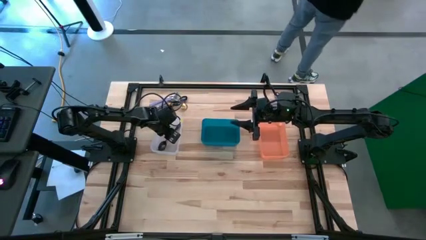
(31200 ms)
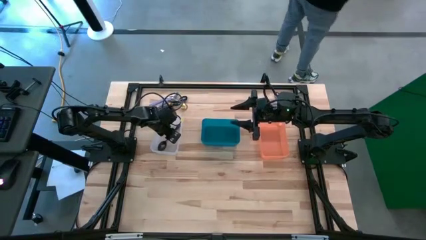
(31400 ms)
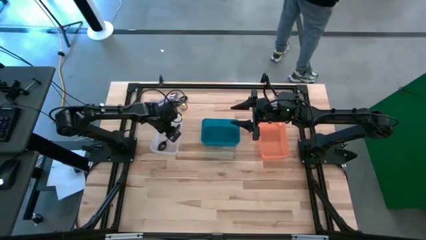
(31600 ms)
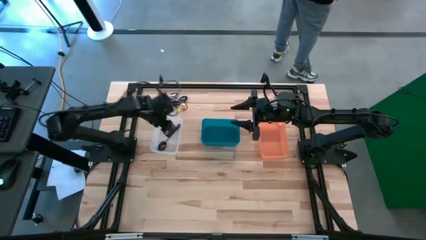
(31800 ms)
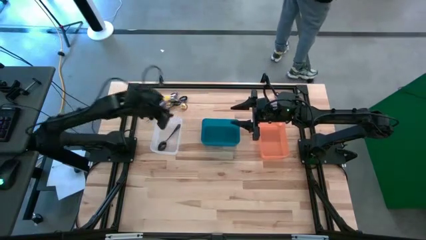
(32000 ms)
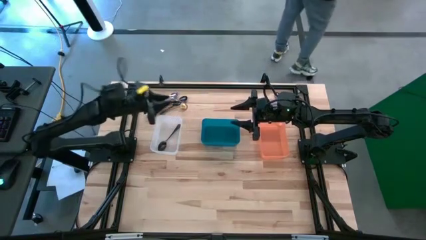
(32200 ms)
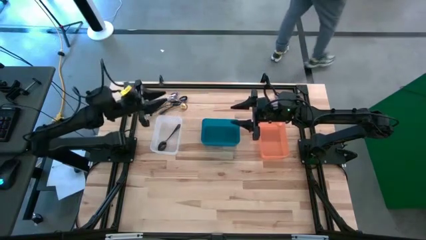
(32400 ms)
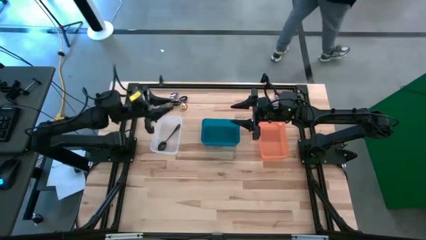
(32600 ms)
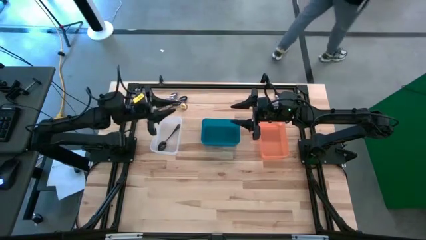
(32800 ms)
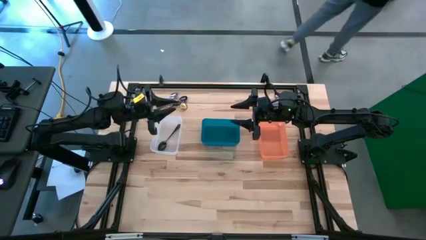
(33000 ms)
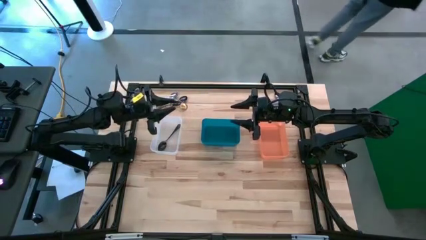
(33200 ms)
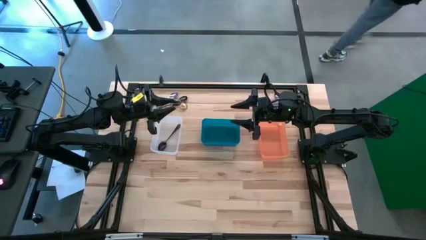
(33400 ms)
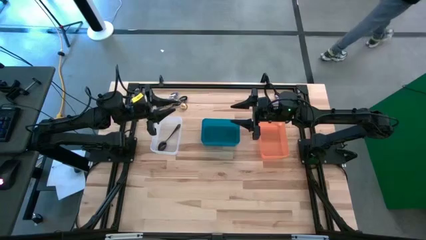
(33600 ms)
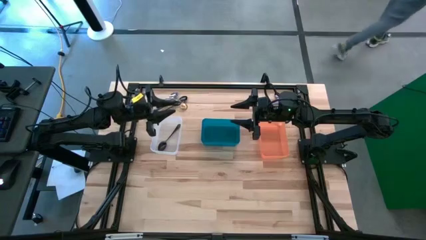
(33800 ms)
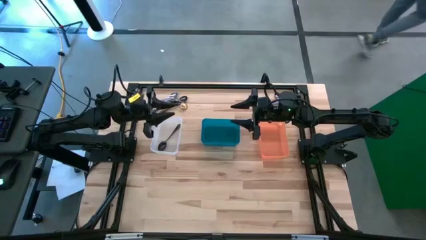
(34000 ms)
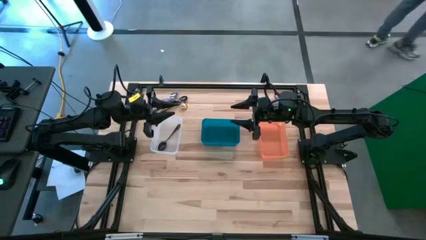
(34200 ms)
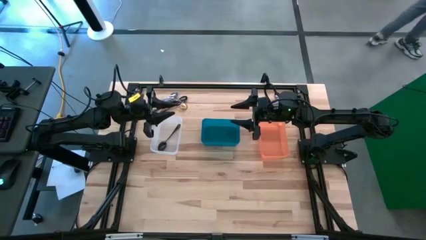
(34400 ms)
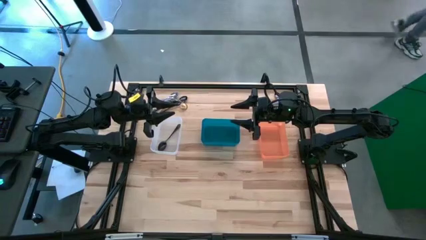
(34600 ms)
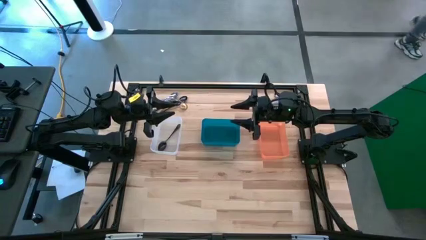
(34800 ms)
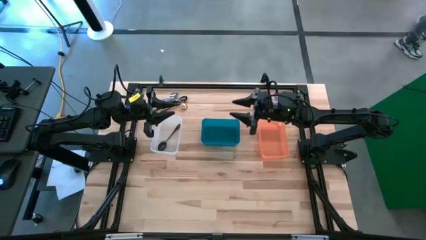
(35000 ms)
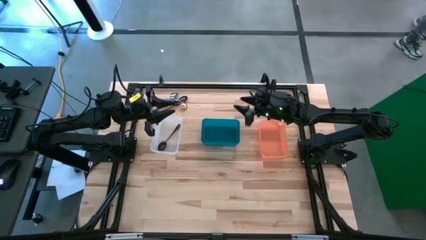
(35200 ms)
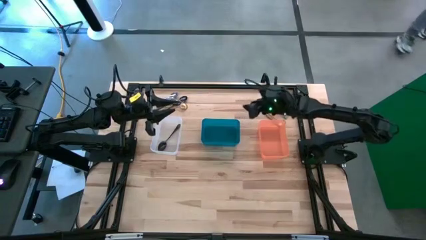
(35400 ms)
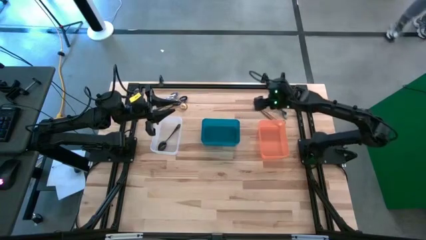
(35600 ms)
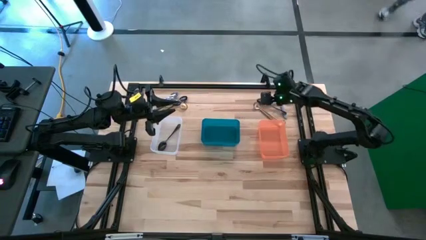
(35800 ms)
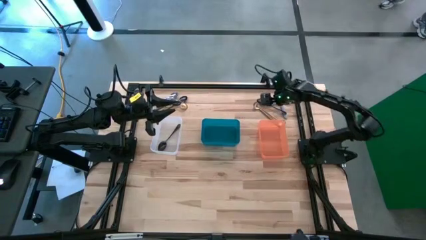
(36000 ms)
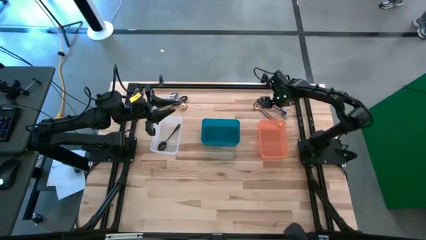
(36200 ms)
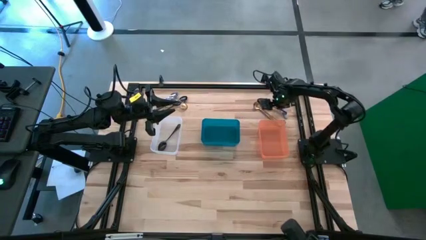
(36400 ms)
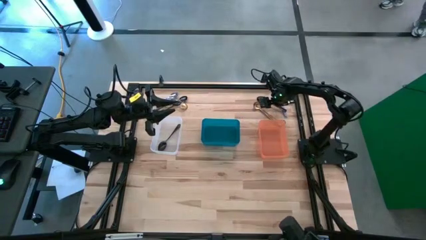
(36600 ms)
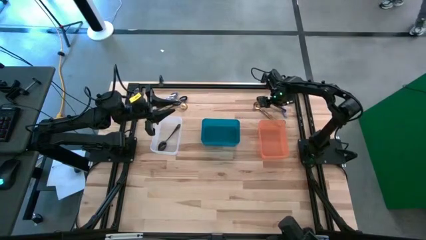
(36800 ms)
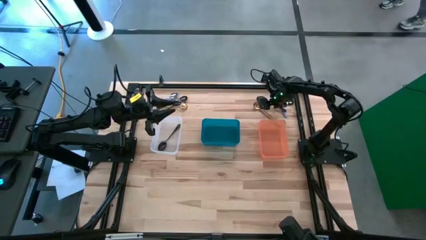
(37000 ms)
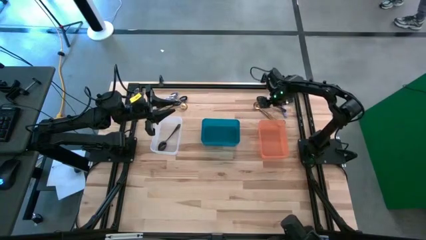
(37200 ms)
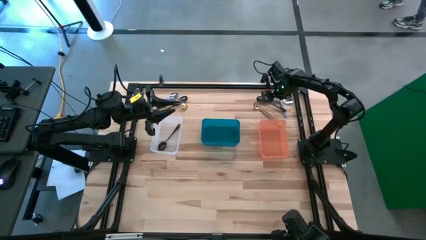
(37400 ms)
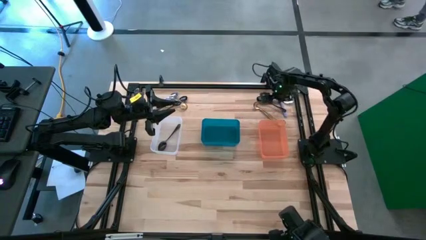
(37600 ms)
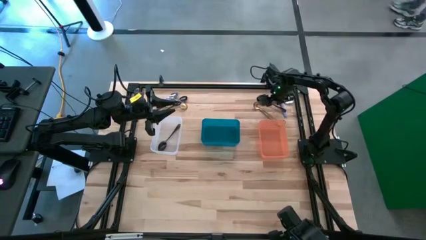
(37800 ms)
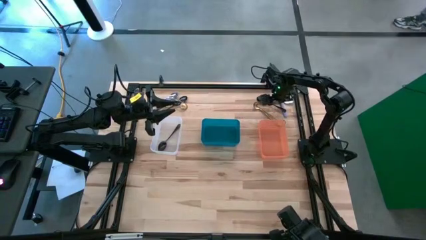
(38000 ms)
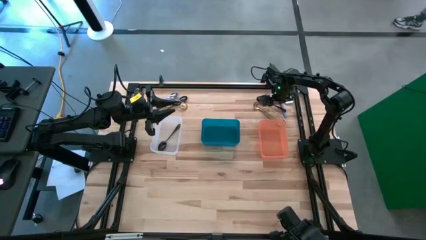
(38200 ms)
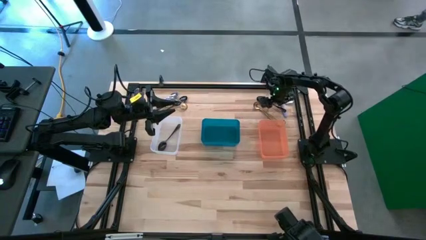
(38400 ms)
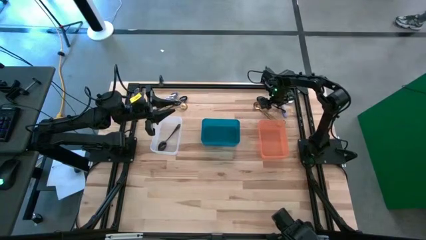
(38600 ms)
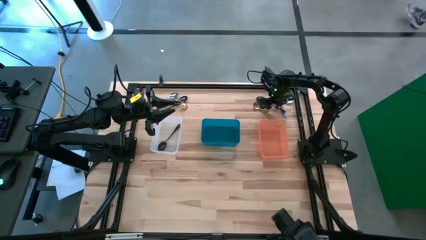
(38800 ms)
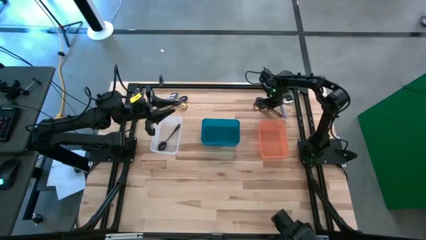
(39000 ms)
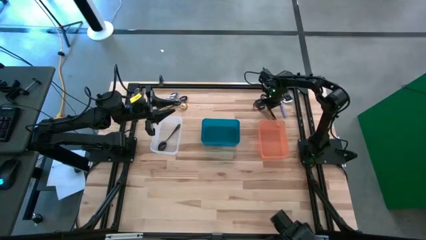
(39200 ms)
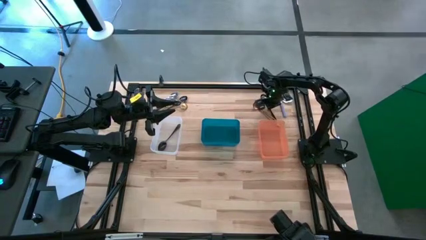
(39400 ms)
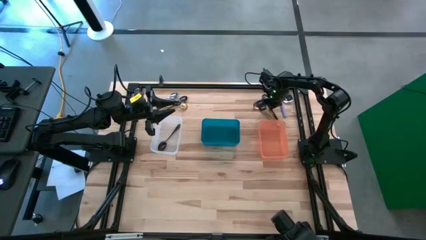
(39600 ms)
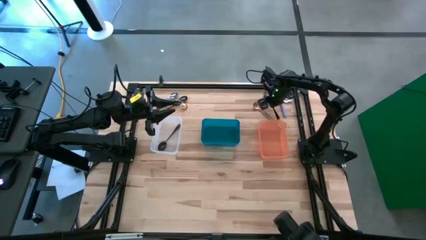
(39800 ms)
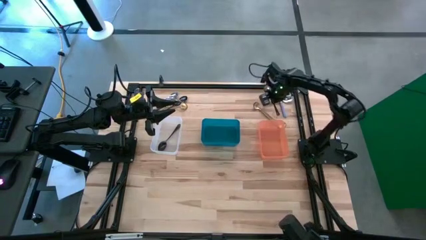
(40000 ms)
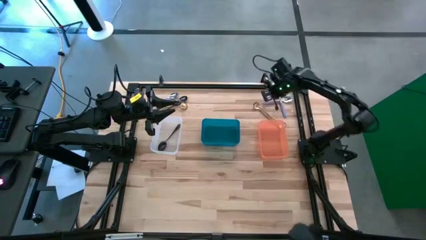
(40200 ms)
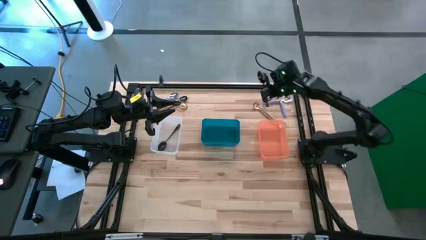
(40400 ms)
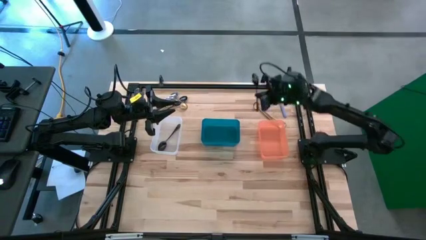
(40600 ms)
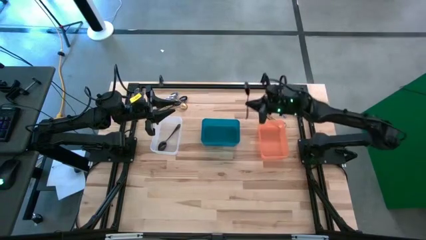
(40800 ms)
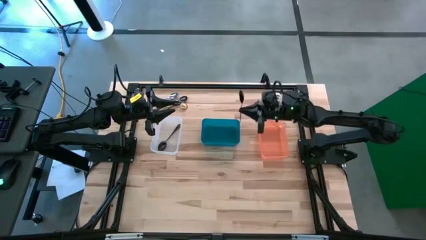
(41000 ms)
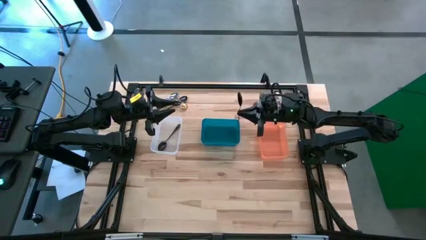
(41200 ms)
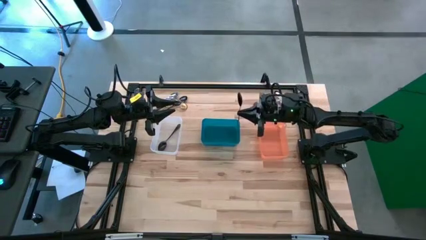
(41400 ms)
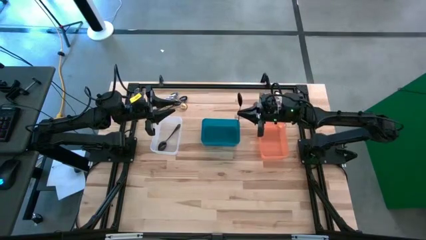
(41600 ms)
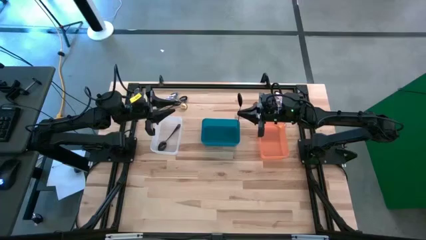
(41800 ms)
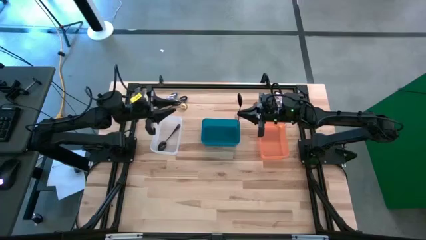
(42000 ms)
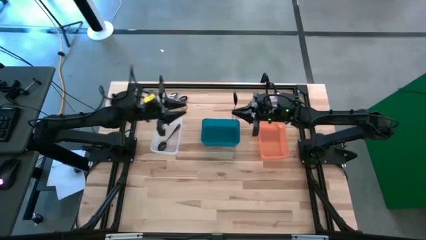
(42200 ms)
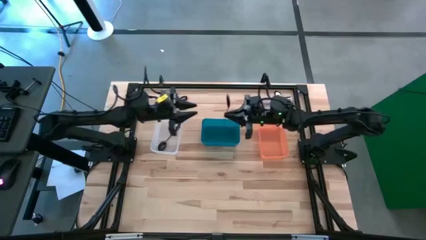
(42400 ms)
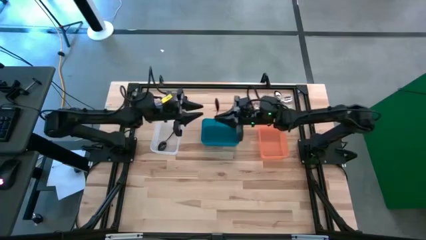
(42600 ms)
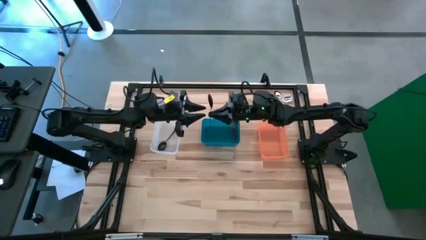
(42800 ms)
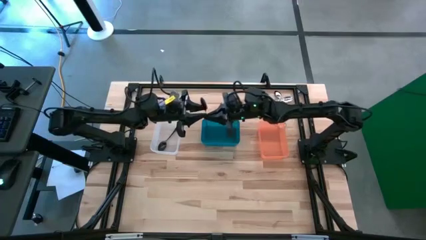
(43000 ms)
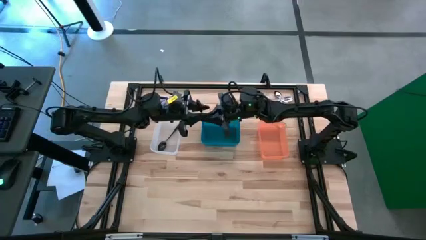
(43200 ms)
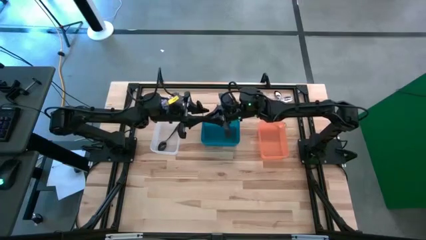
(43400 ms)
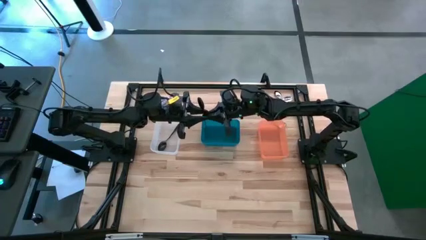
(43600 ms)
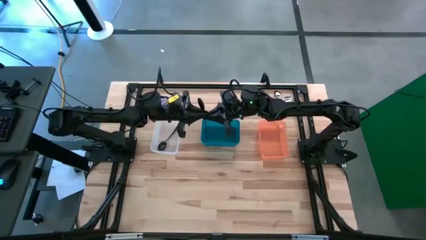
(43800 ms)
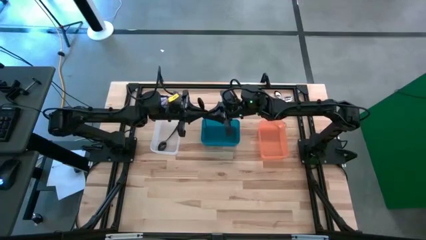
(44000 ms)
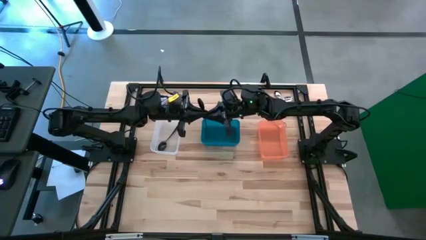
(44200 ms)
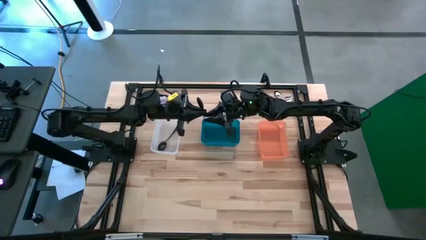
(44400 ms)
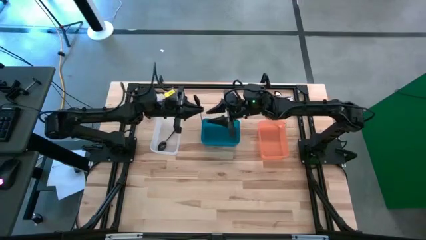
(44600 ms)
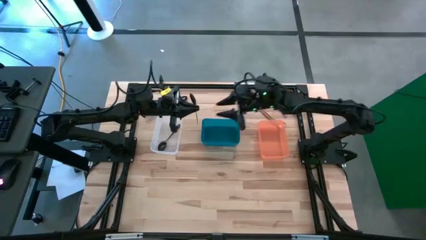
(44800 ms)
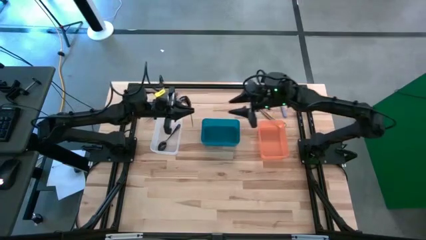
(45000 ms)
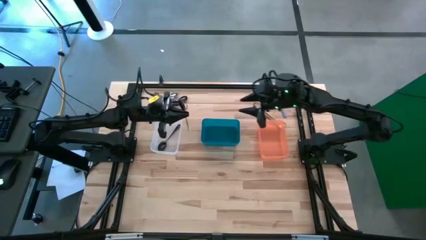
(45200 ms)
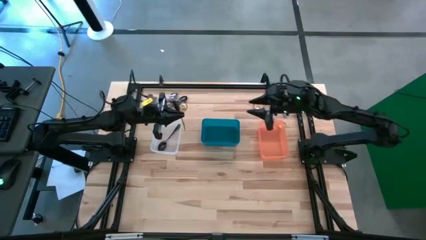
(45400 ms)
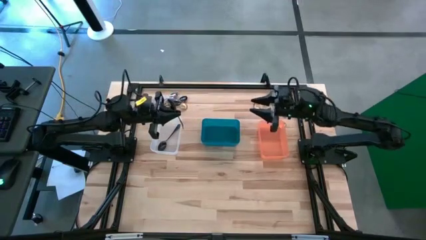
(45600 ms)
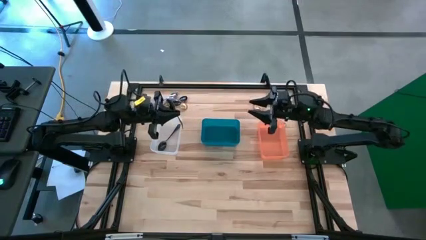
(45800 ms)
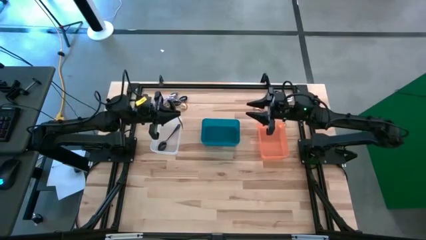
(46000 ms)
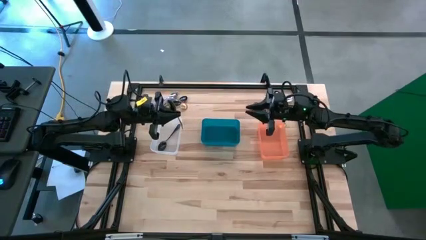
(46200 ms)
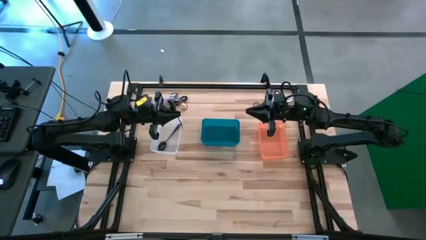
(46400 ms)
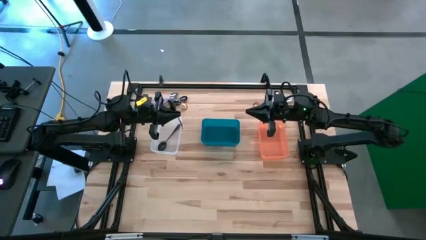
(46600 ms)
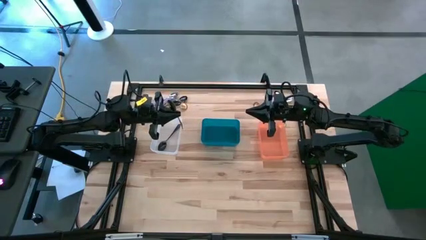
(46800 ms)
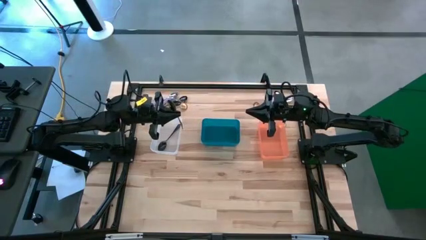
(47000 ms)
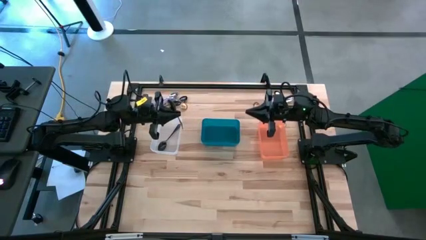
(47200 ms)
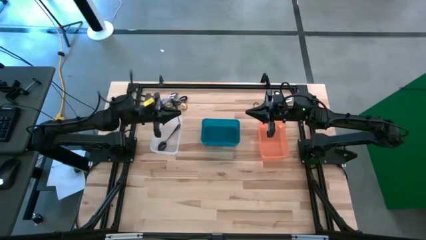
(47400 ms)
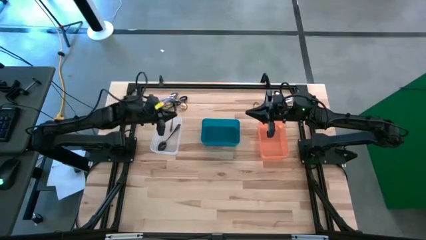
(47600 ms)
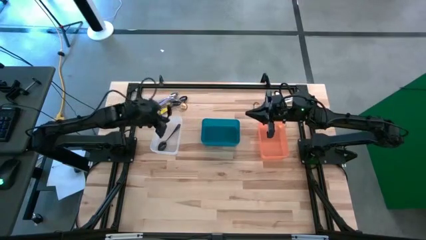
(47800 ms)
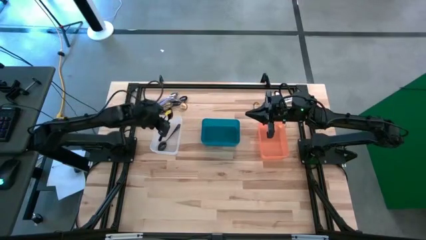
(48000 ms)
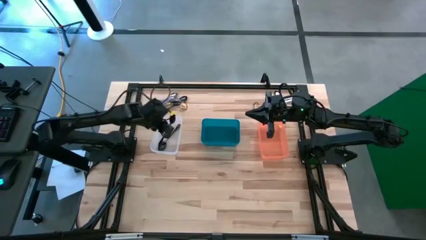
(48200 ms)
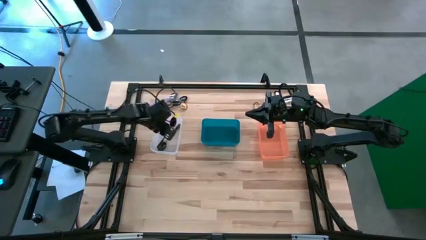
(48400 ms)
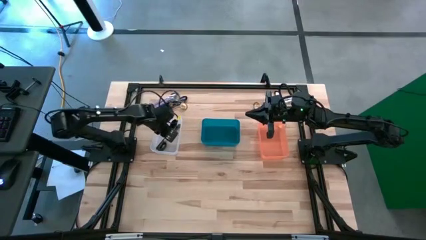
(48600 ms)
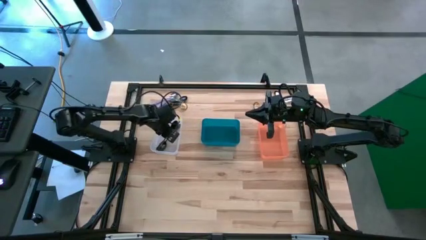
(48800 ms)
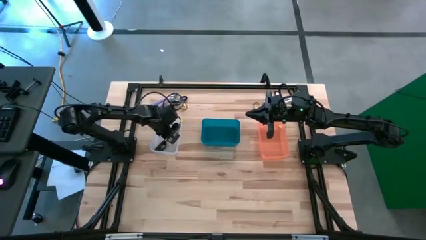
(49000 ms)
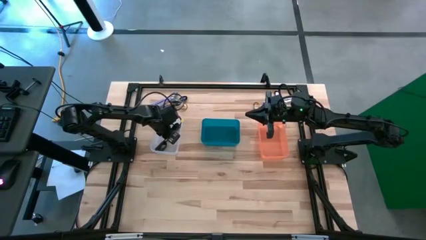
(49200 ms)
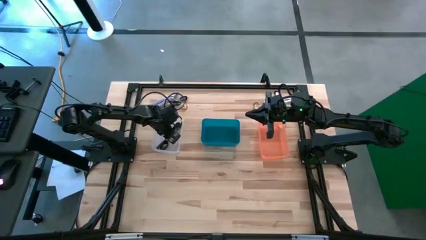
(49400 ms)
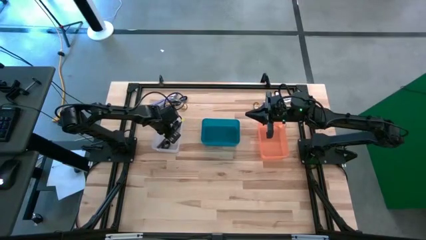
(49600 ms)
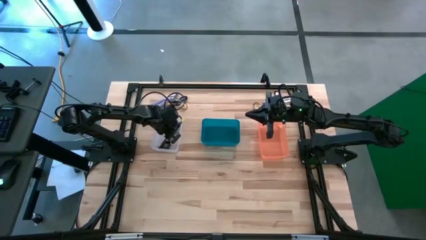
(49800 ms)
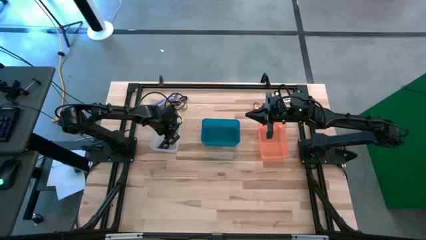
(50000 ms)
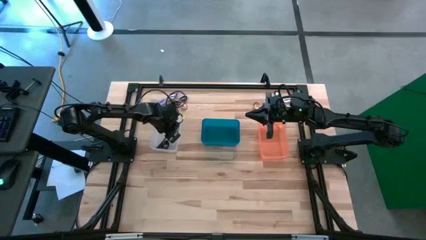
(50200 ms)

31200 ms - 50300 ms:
Task: Sort silverware by color (type)
Put the black spoon into the transparent bin
